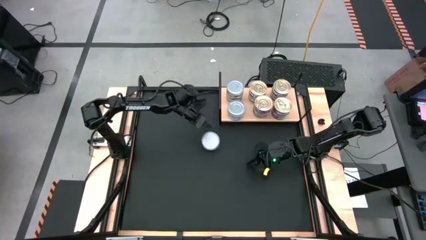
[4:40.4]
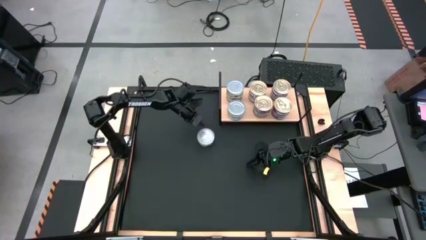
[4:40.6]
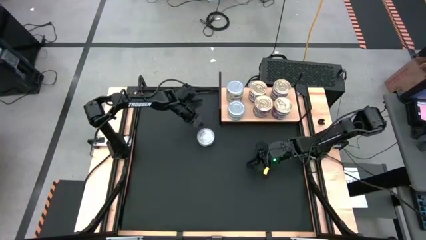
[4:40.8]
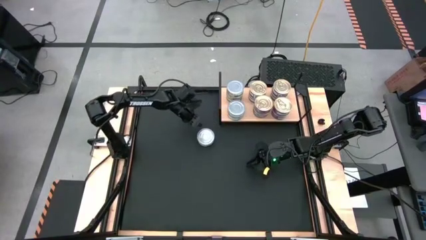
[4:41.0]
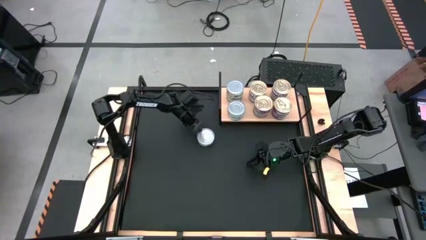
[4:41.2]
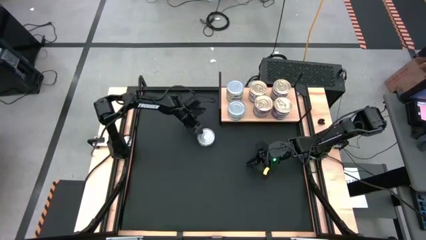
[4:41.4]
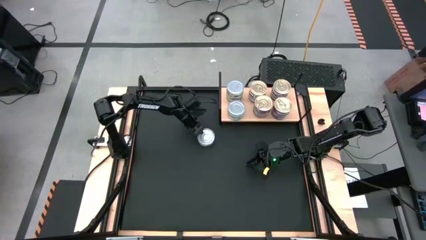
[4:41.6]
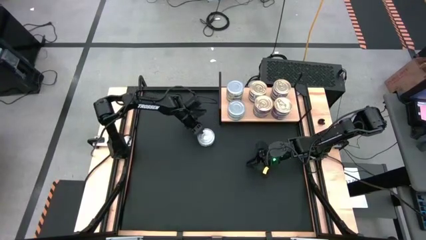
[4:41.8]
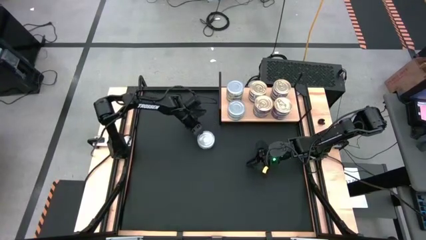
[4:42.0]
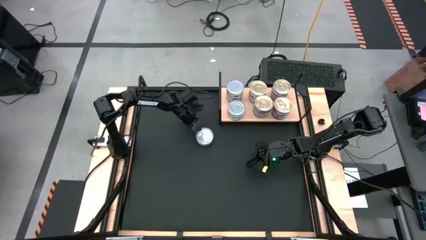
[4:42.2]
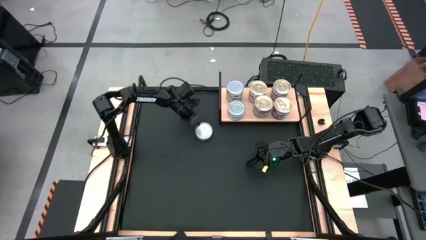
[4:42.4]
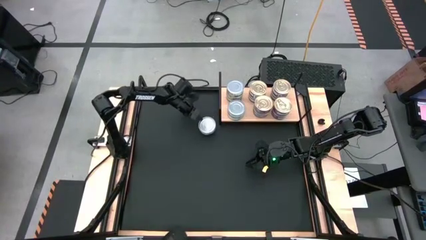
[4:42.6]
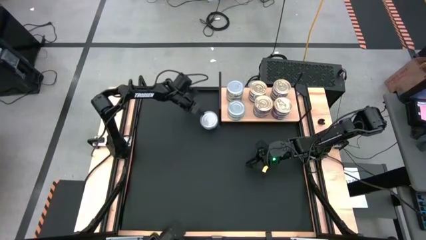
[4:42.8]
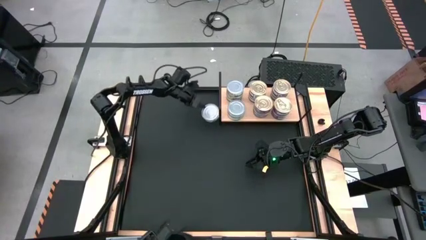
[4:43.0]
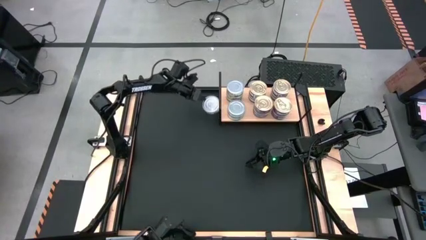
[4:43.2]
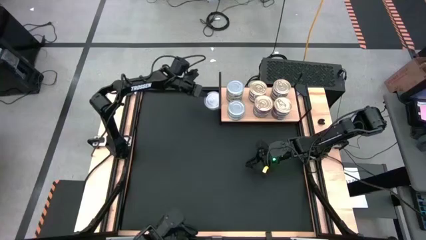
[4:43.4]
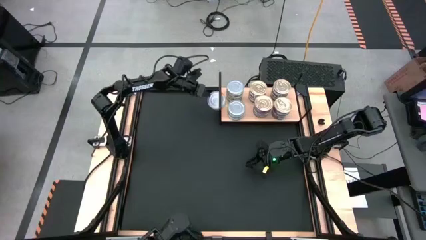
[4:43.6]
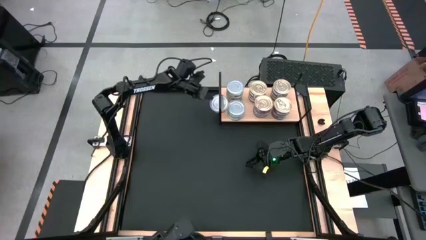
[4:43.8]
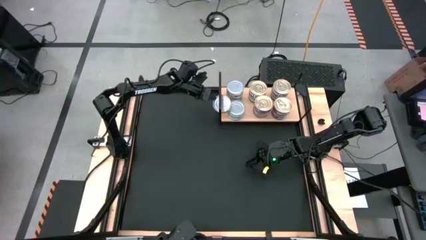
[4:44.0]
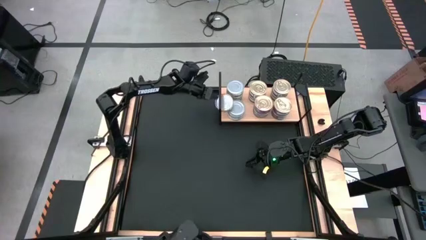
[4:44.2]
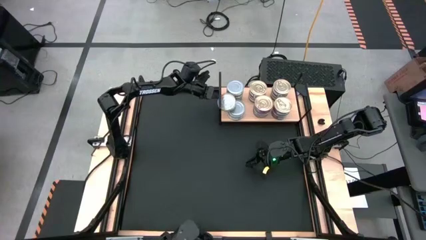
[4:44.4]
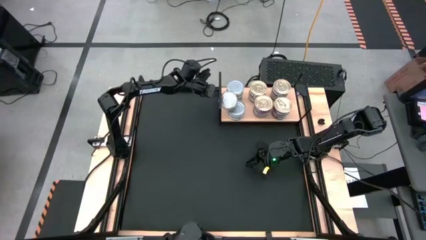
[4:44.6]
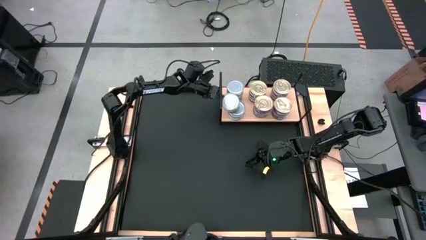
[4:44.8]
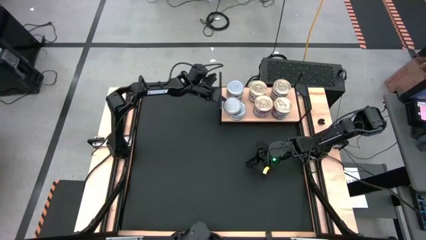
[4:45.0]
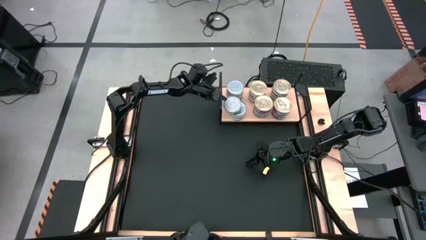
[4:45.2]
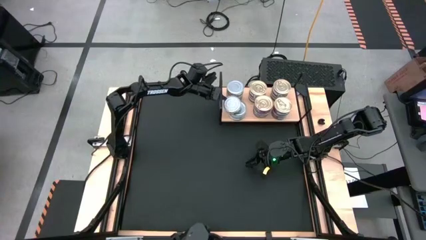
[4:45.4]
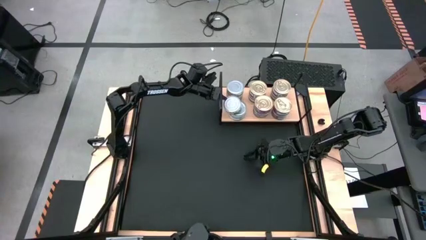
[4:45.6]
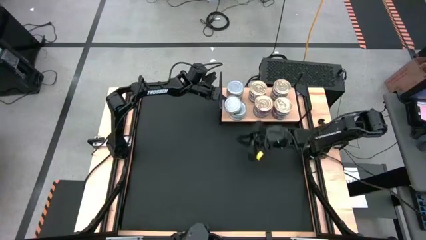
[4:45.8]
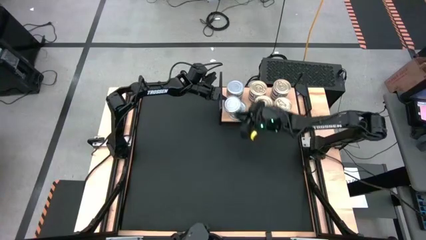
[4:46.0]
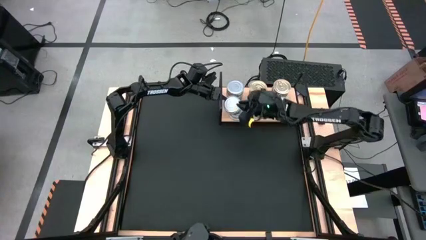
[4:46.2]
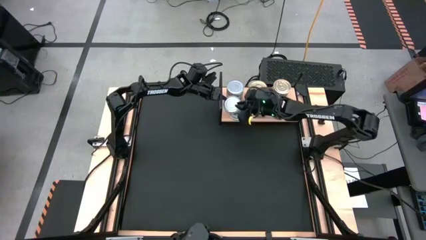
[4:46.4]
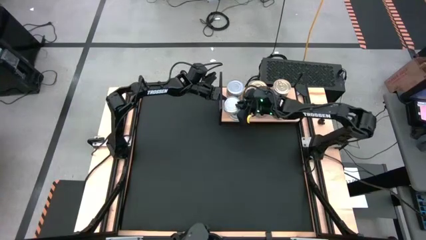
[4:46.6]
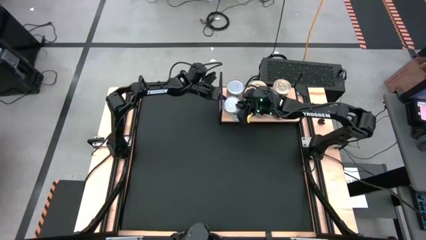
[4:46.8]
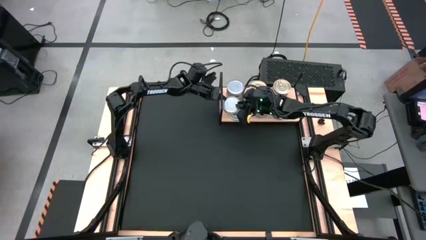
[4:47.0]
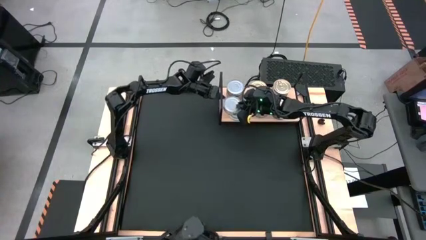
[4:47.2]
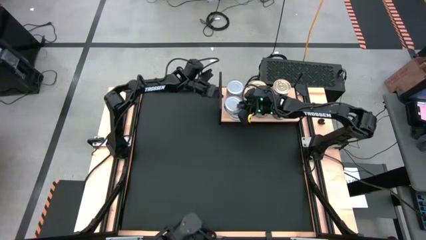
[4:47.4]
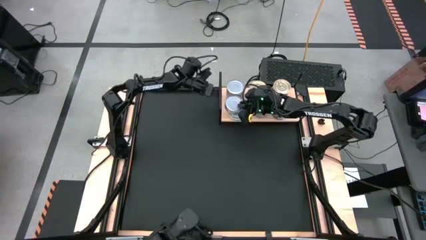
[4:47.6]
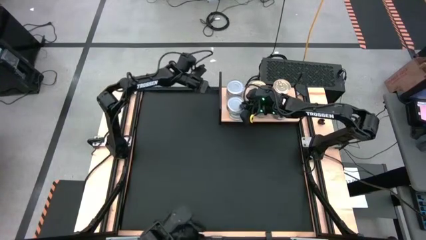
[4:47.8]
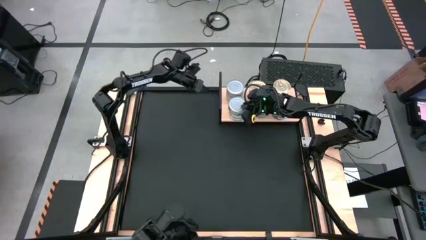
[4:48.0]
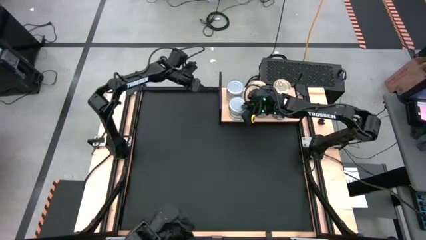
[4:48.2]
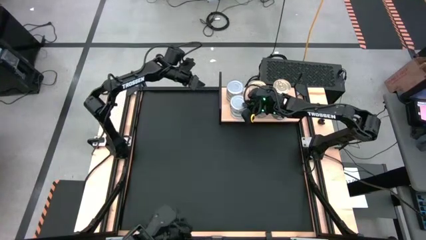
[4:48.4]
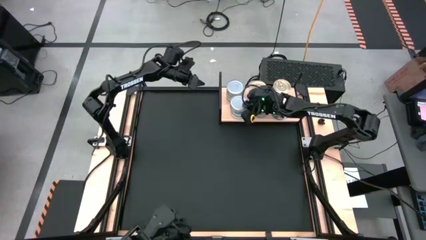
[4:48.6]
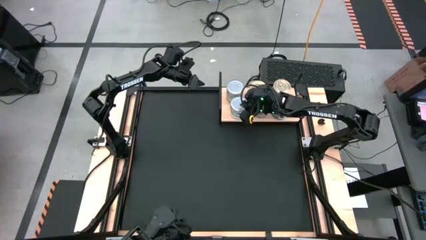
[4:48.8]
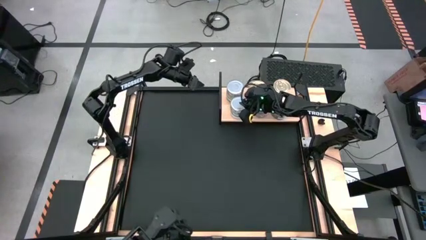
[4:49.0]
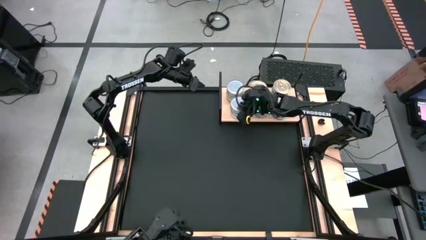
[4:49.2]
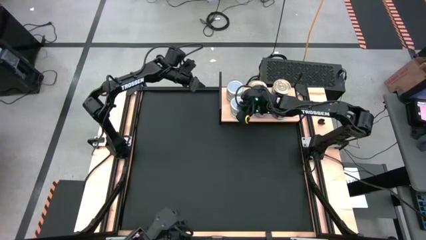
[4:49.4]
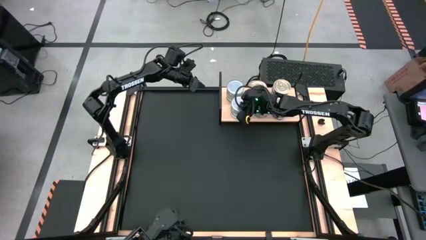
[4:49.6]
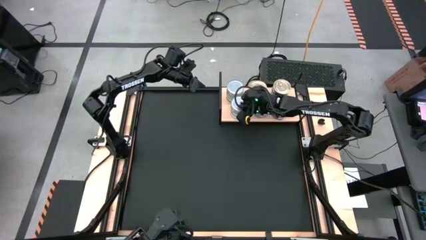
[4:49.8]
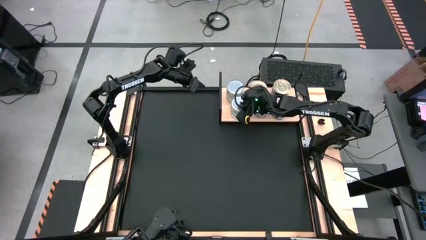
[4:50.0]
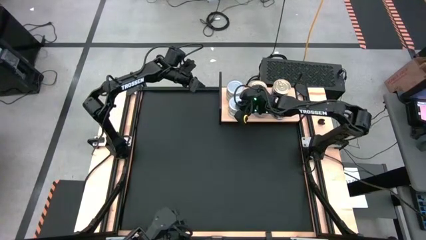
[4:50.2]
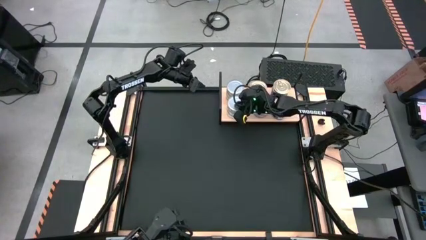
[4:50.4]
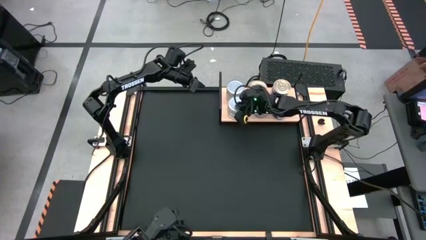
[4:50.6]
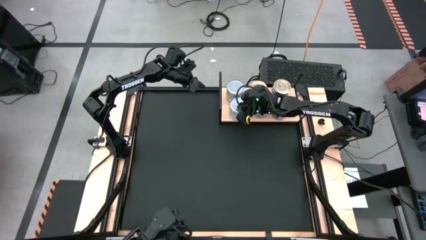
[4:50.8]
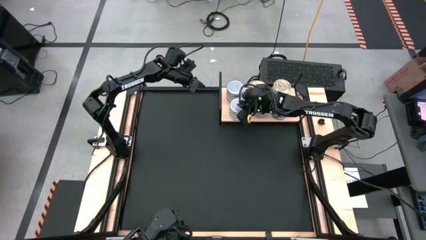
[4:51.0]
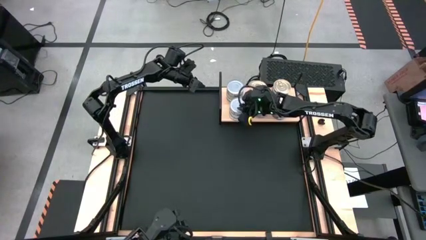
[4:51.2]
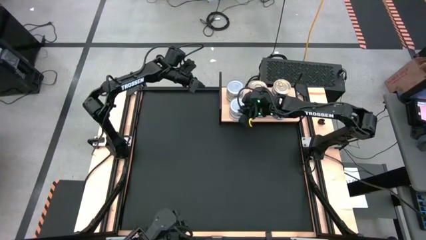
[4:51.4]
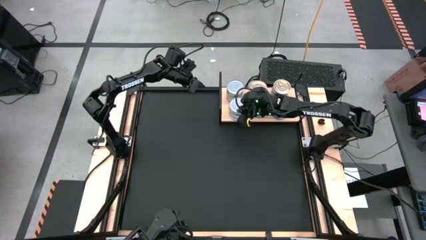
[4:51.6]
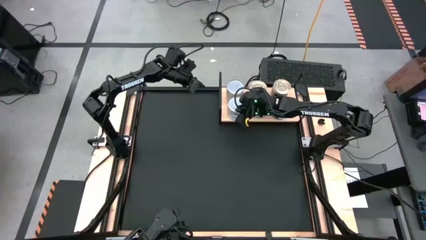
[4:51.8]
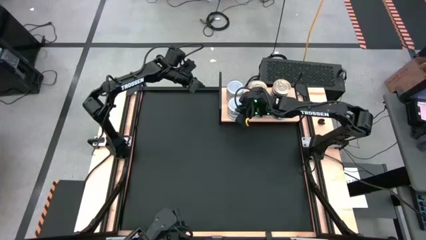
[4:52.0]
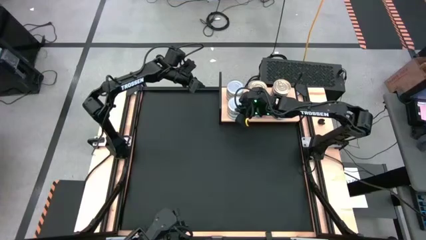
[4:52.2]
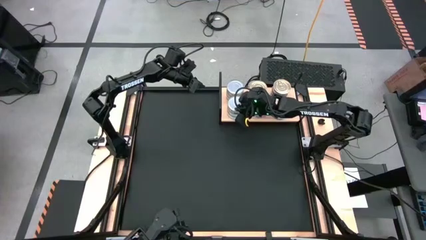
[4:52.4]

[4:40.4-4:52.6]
Task: Stack canned seafood by type on shelf
Stack the green tuna can on top of the other green tuna can on the shelf

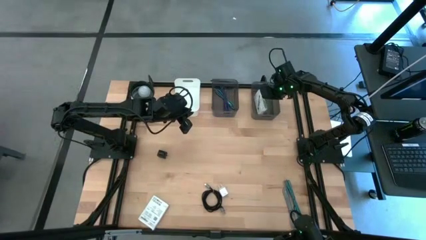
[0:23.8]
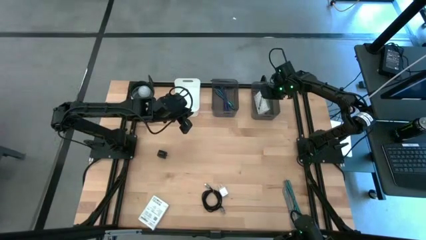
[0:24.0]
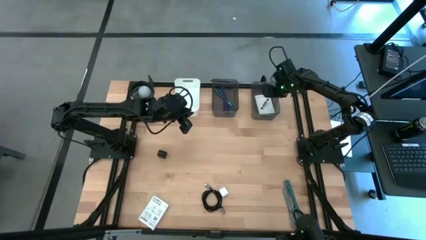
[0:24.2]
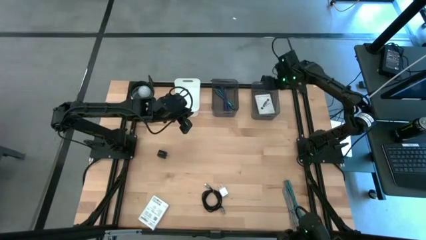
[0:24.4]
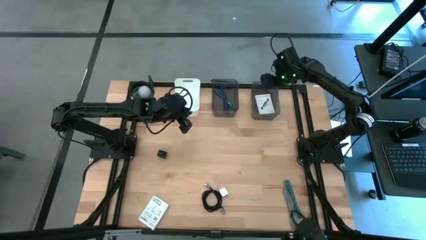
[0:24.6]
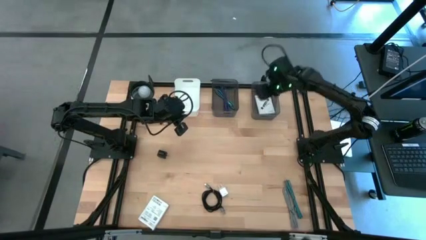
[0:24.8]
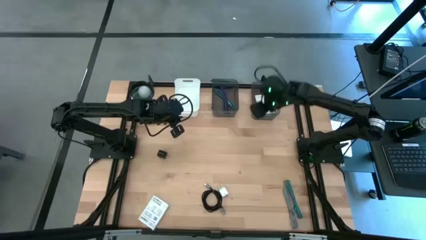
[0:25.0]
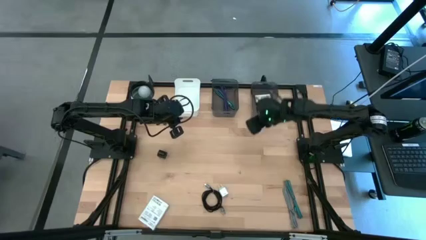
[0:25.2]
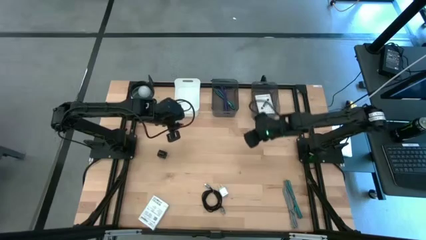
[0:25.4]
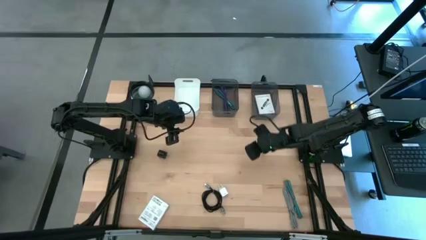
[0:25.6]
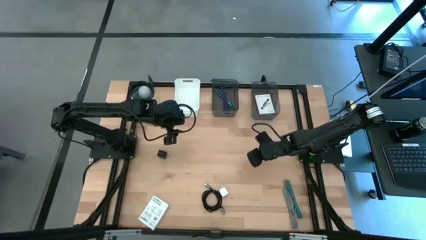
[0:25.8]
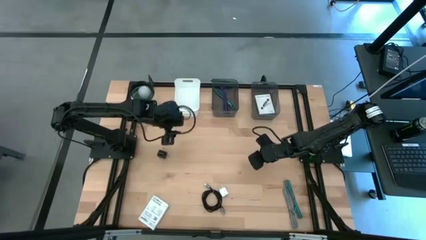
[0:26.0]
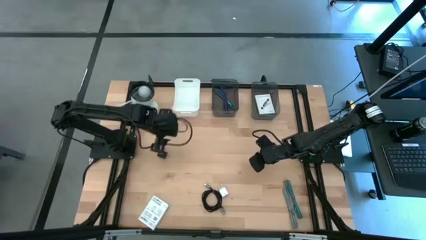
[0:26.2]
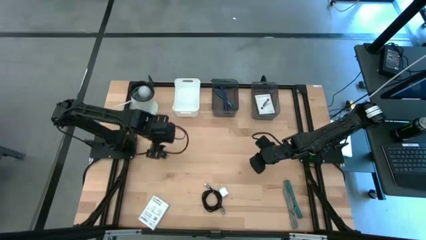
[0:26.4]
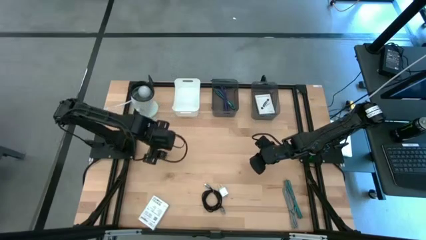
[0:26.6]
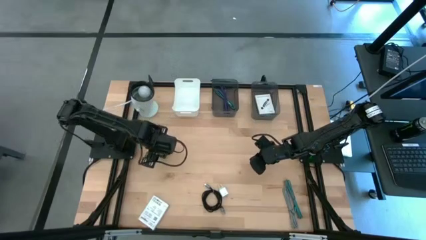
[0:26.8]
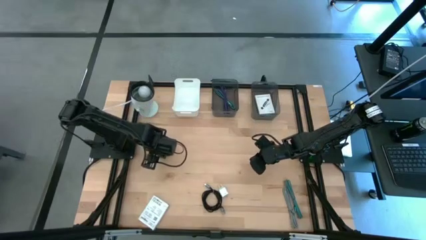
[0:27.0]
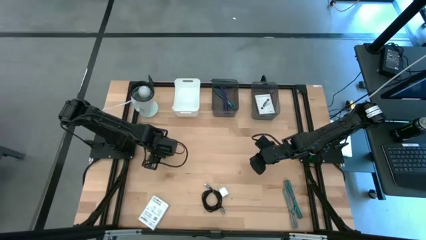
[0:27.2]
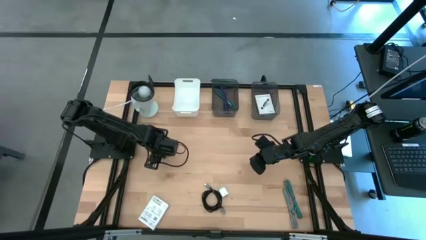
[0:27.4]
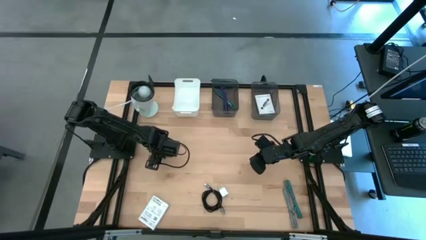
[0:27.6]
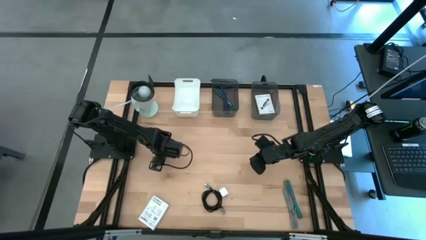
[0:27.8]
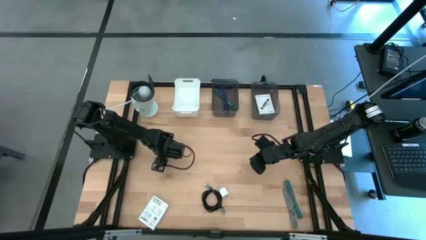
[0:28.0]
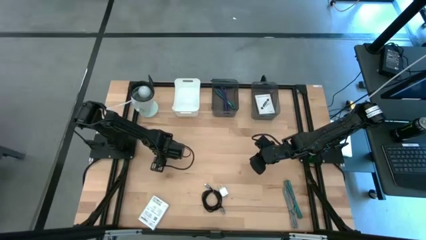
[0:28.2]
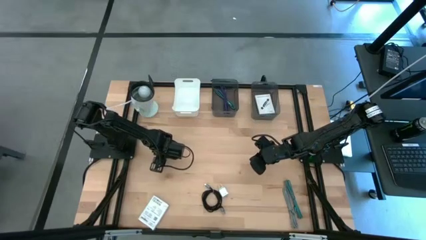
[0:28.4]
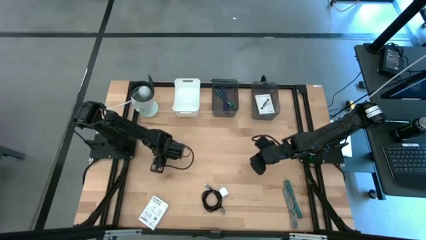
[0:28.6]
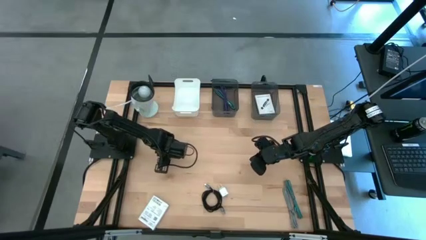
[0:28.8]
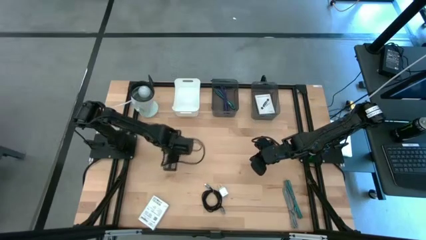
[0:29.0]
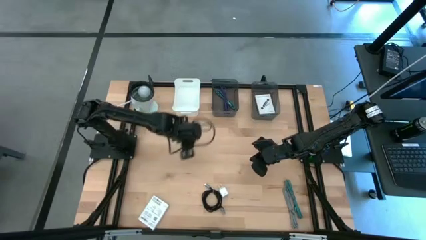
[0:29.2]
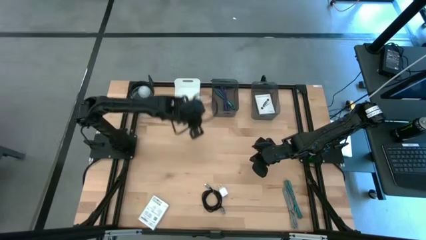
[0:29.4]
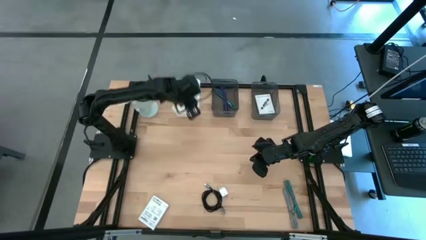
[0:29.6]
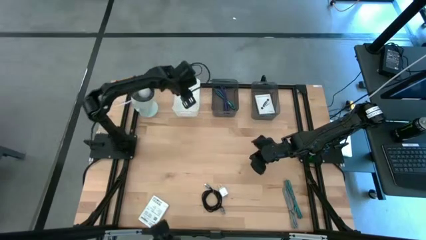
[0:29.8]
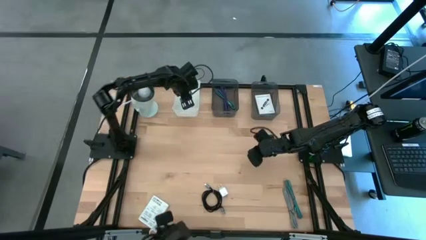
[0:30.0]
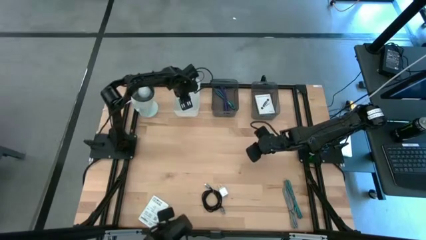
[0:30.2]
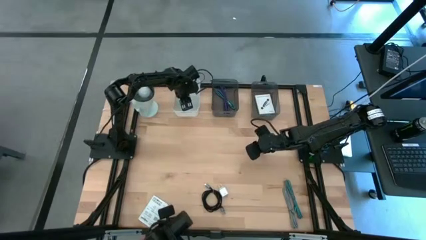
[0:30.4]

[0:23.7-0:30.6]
Task: Pick and place items into bin
Put the black charger adapter into the white bin
